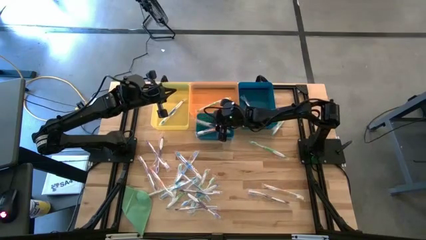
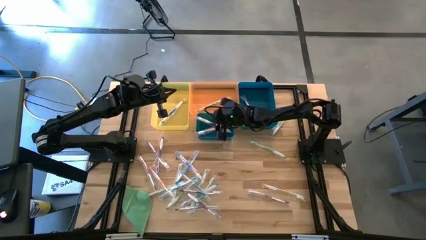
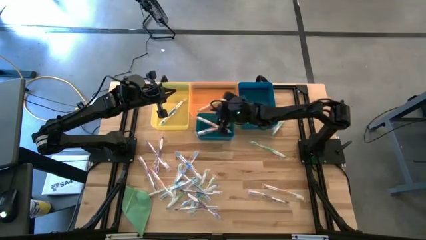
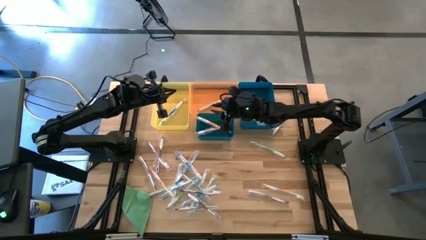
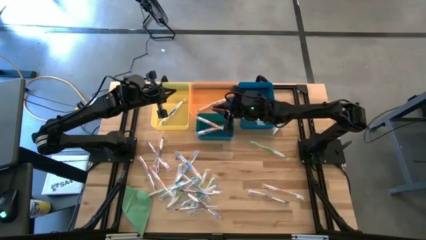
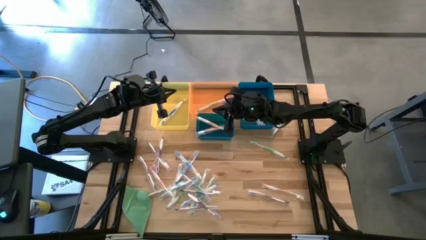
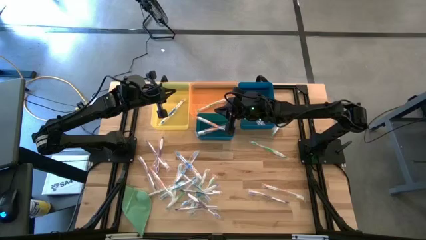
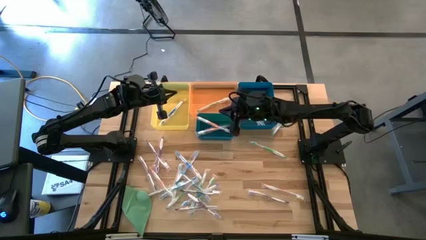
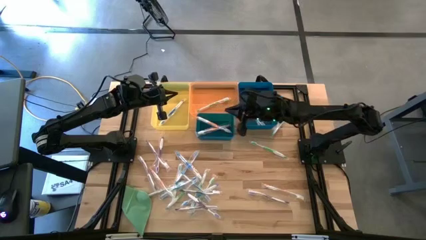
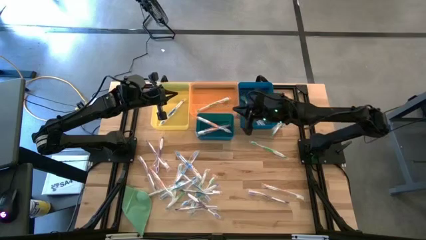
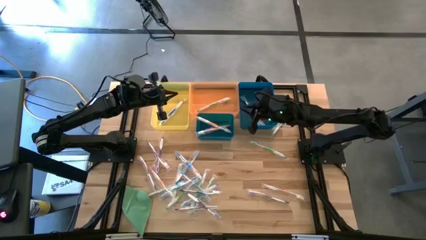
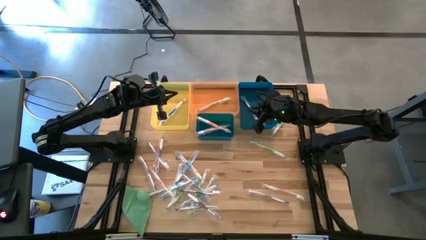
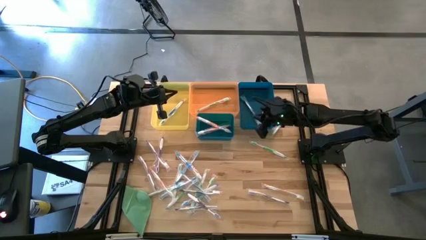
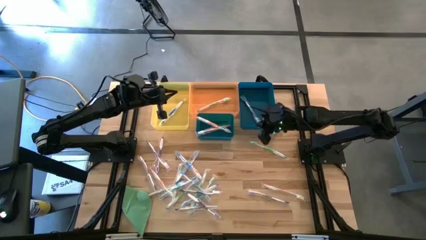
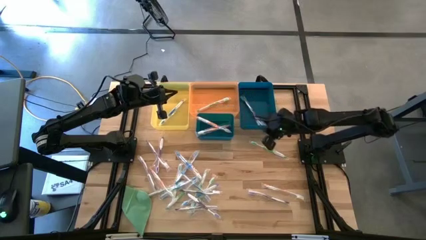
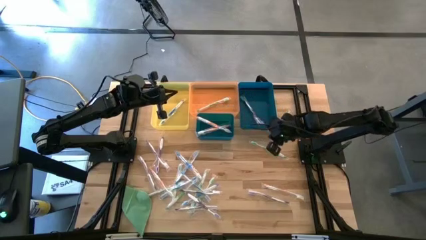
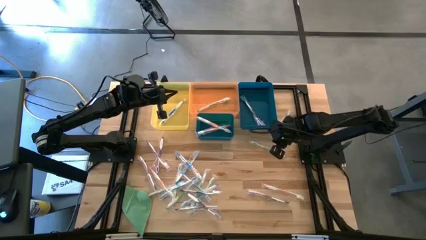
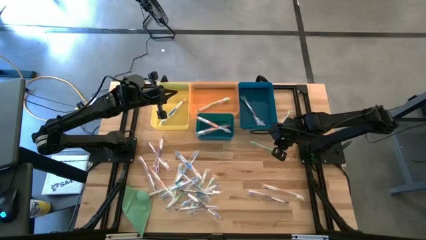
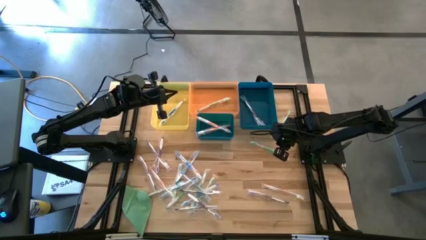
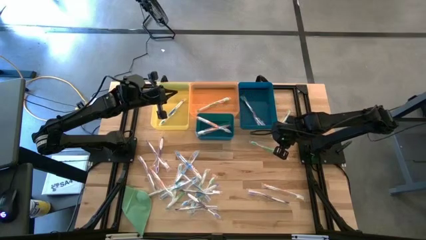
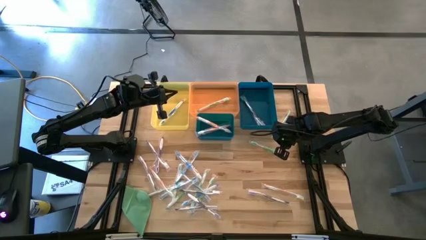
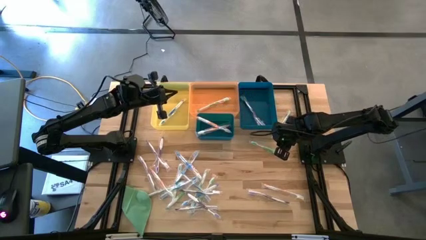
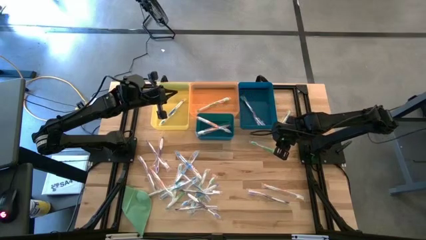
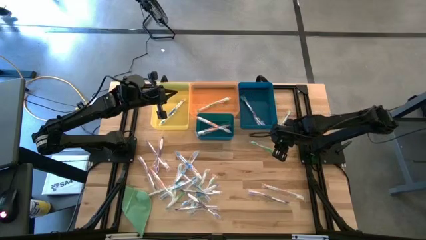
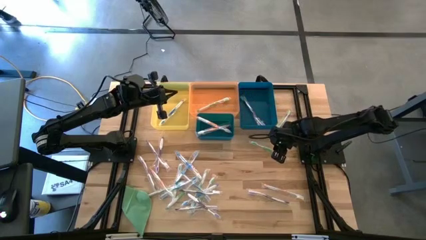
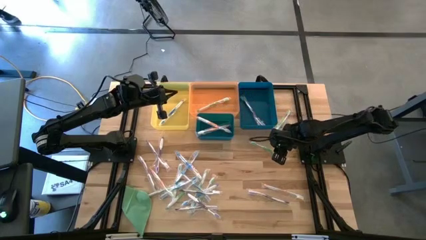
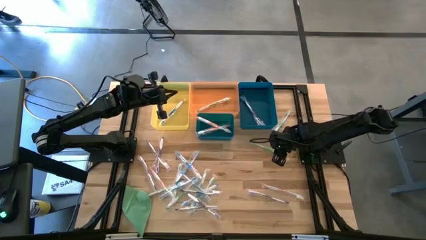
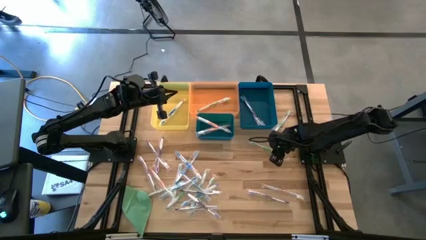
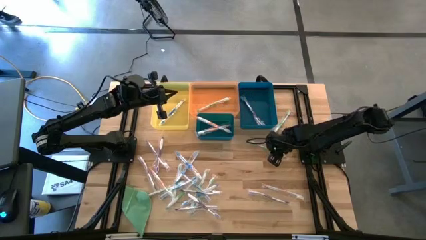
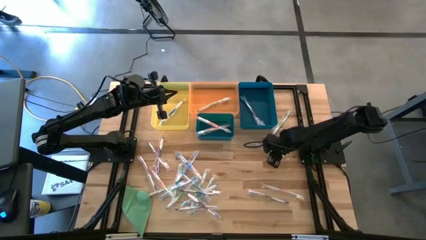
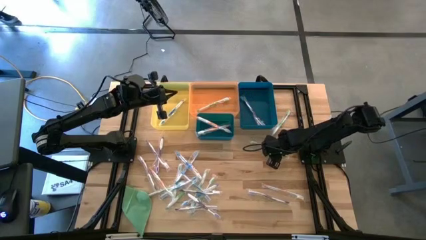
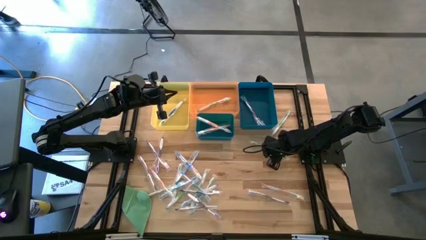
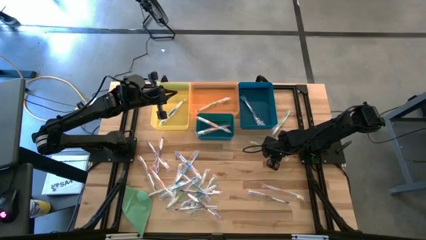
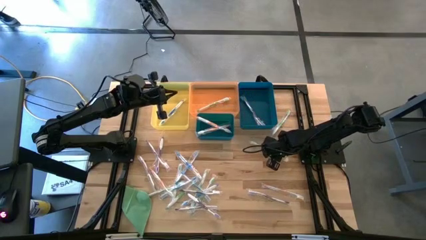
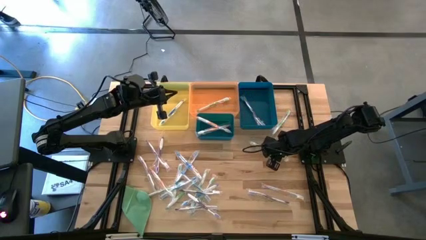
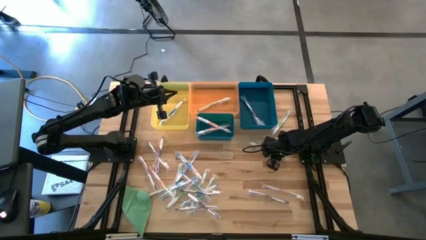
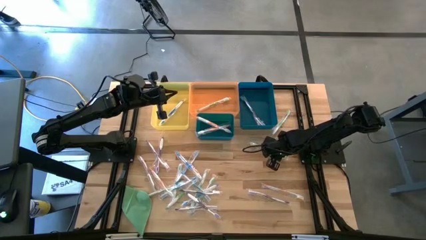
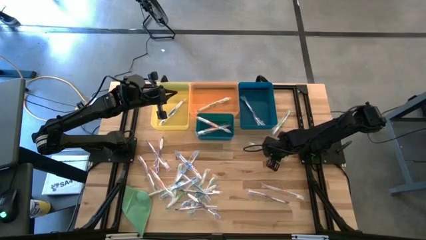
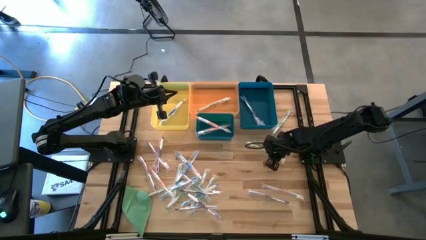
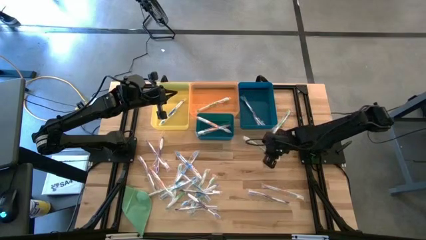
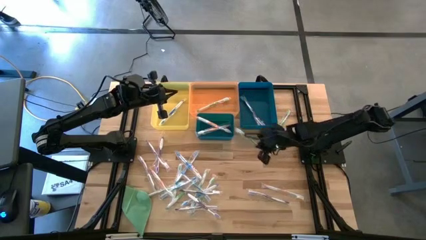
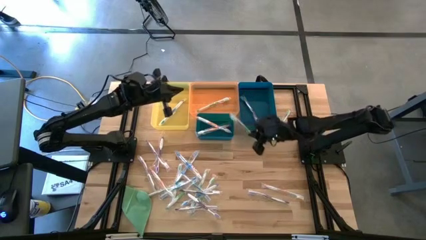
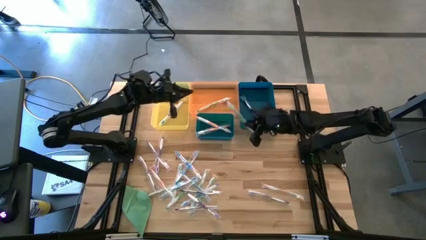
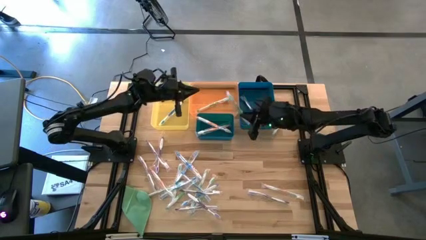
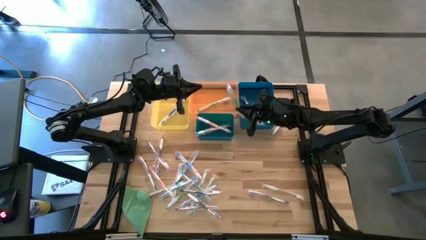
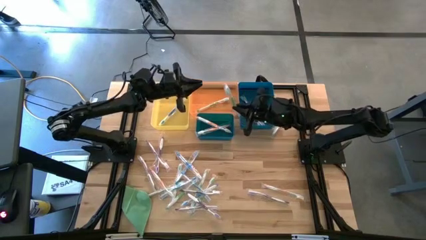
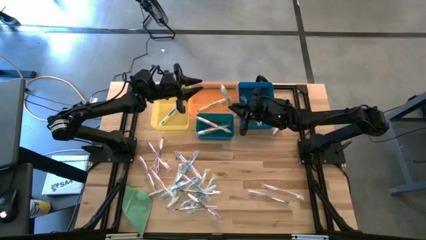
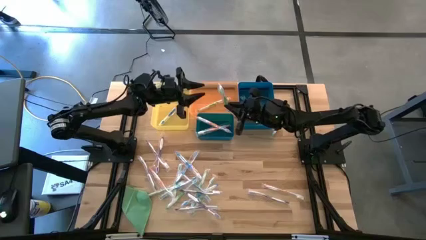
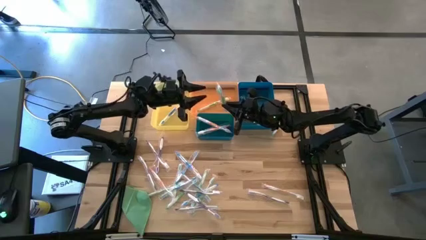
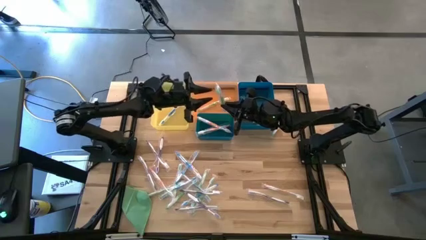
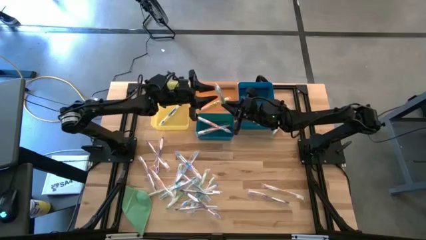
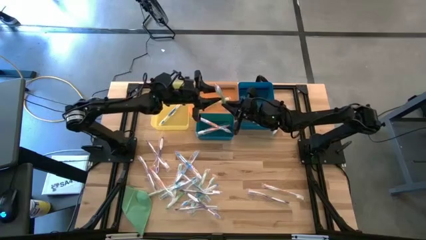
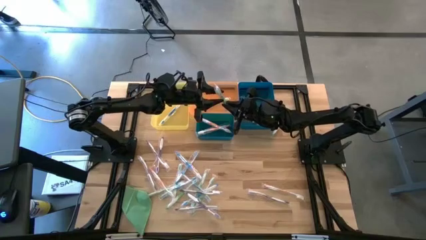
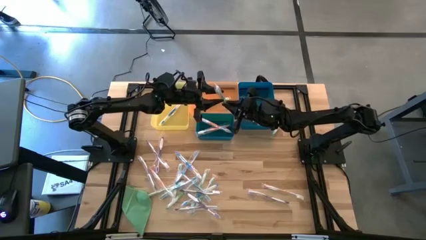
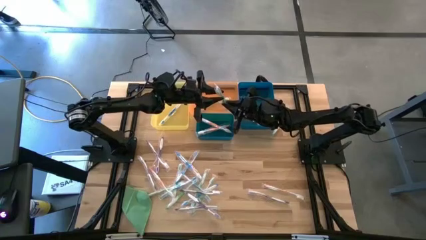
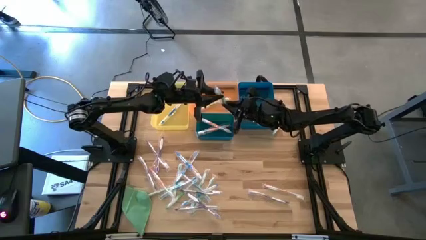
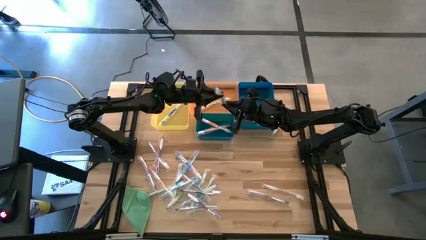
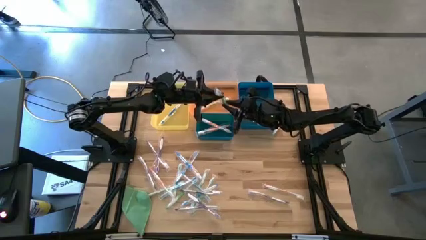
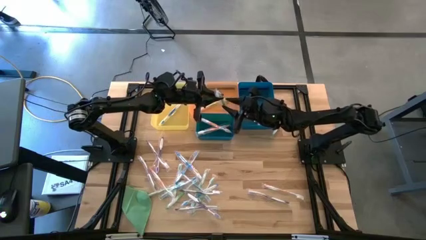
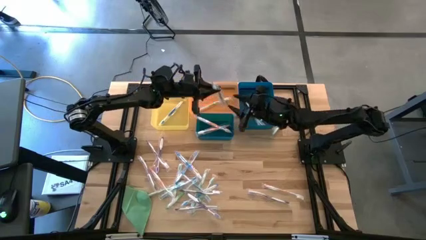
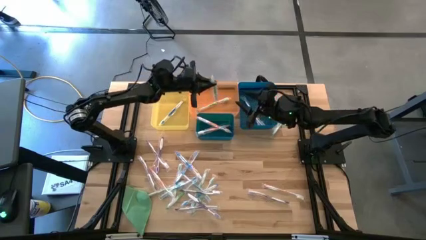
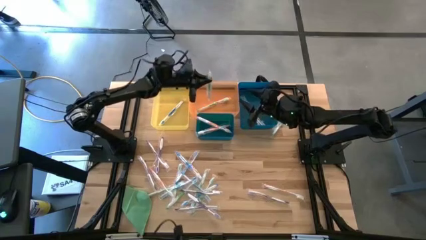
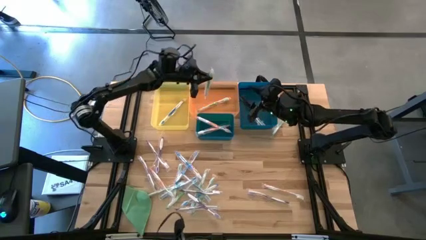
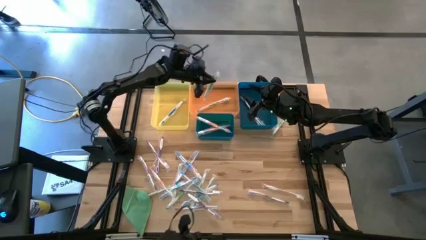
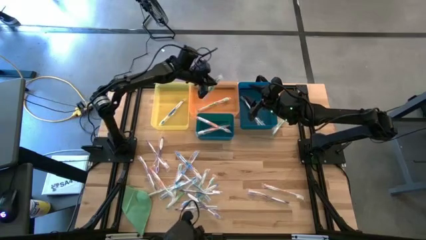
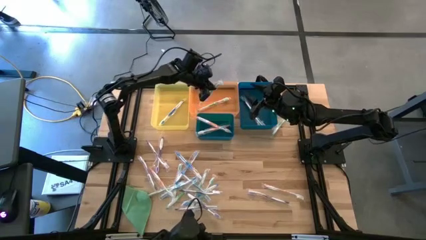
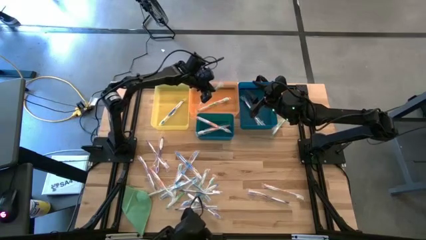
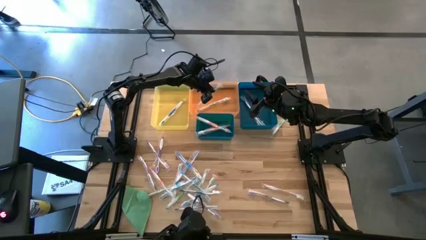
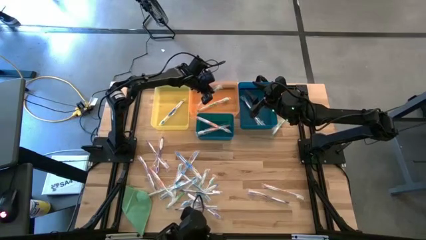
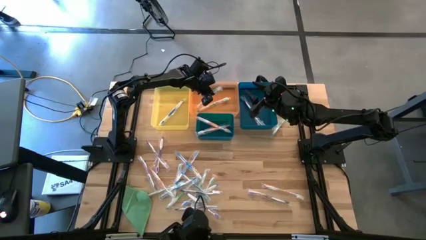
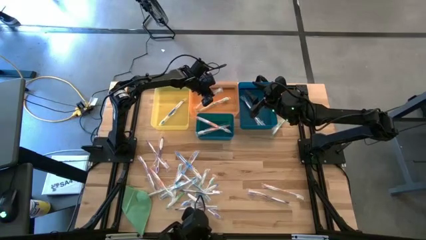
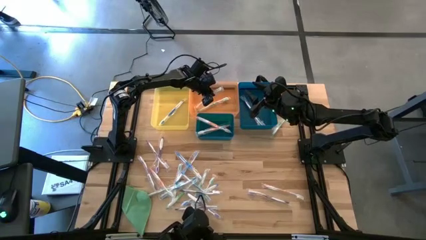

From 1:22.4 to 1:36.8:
Task: Pick & Place Toothbrushes
Put the green toothbrush into the orange bin
